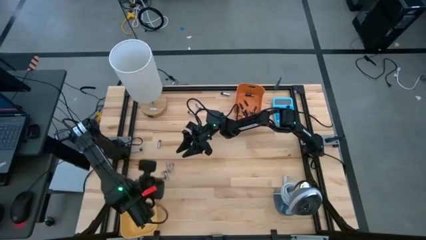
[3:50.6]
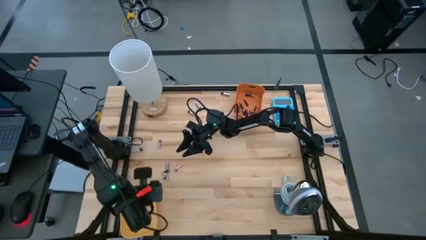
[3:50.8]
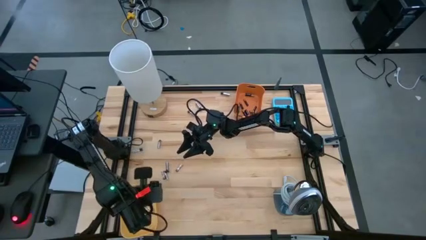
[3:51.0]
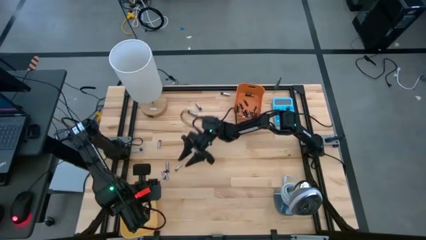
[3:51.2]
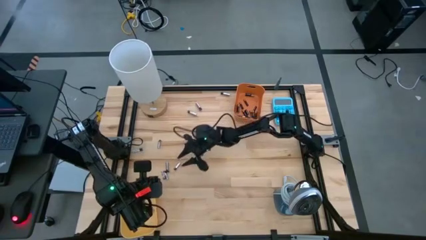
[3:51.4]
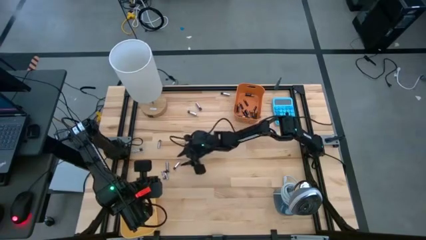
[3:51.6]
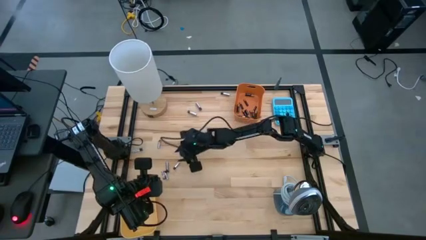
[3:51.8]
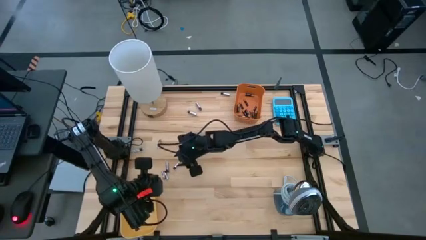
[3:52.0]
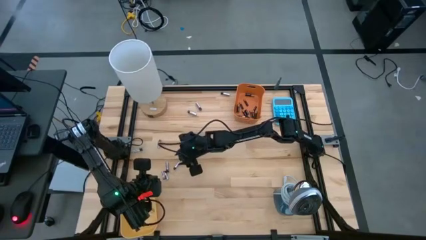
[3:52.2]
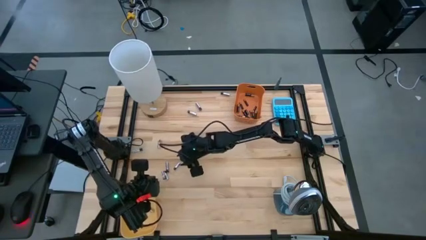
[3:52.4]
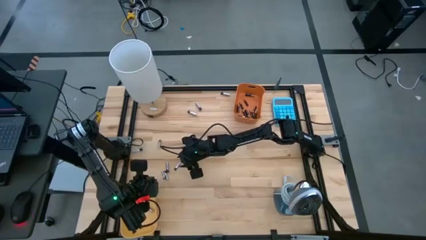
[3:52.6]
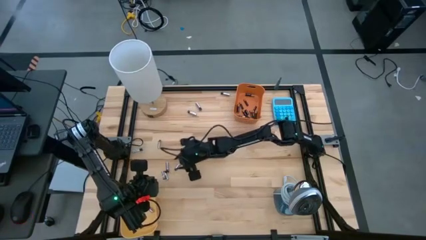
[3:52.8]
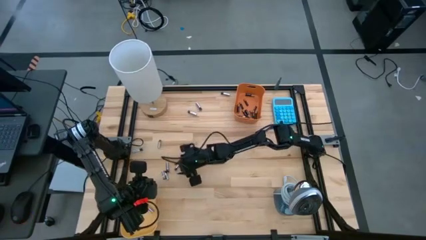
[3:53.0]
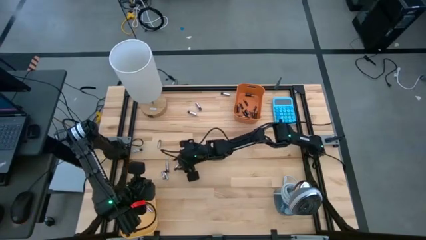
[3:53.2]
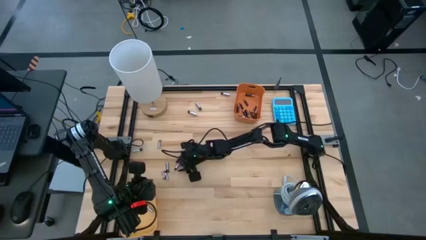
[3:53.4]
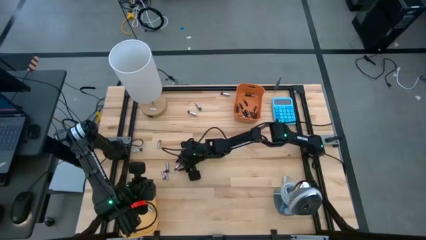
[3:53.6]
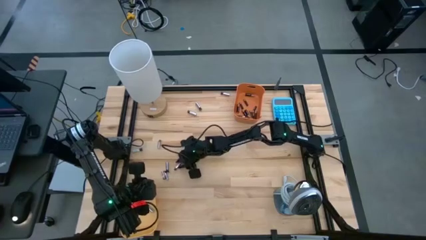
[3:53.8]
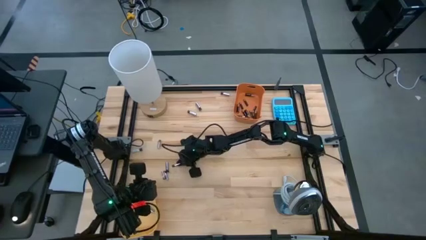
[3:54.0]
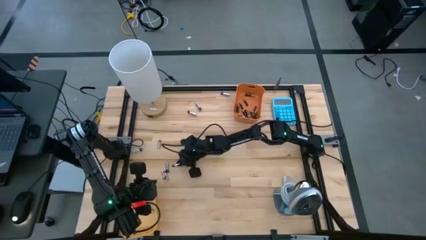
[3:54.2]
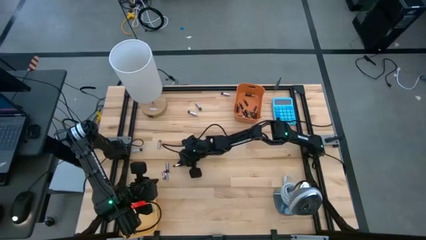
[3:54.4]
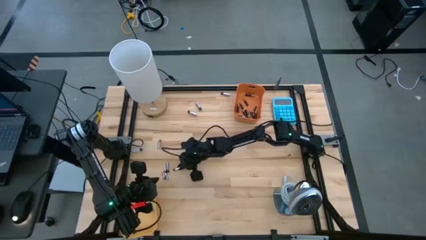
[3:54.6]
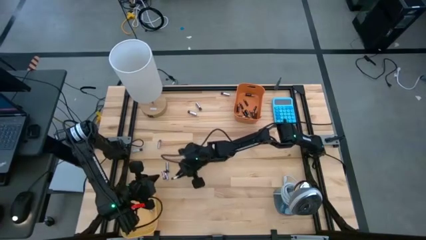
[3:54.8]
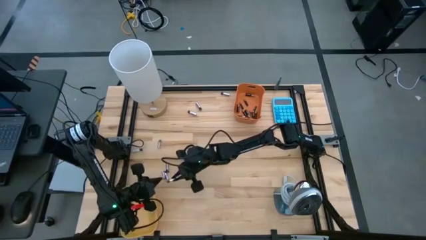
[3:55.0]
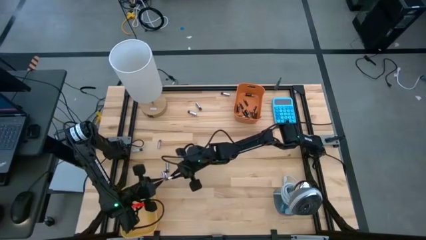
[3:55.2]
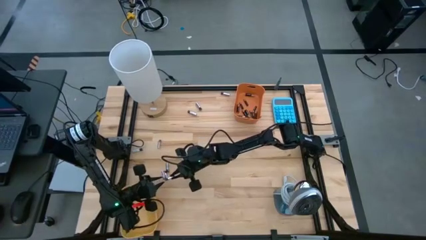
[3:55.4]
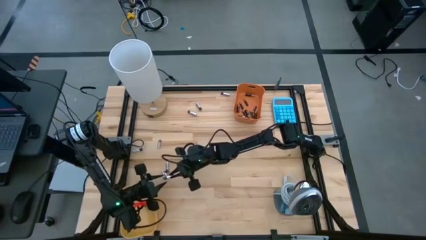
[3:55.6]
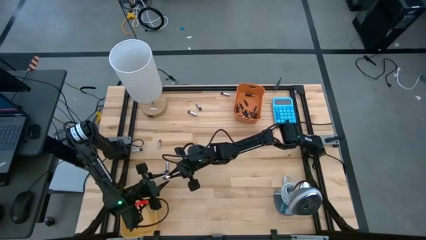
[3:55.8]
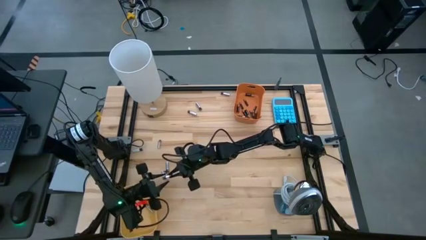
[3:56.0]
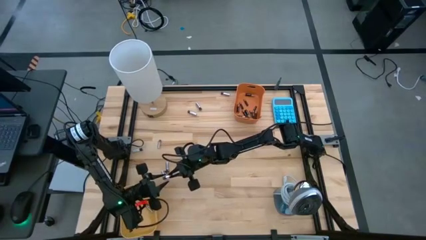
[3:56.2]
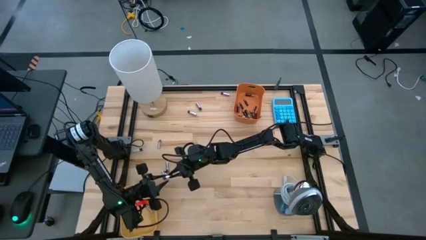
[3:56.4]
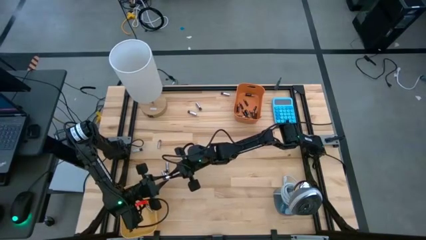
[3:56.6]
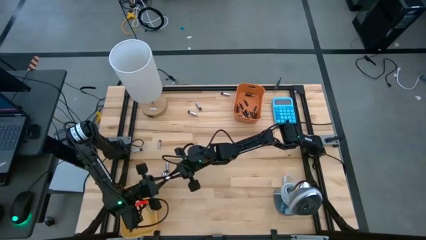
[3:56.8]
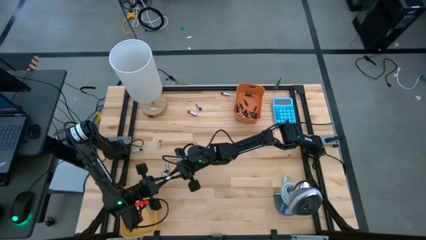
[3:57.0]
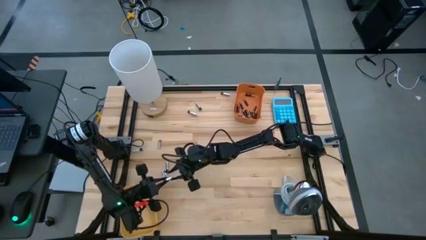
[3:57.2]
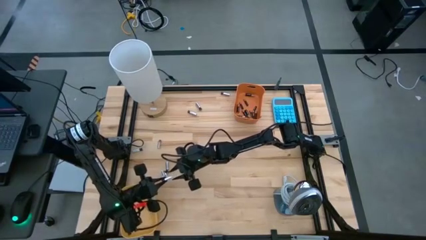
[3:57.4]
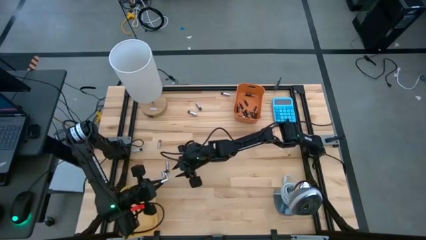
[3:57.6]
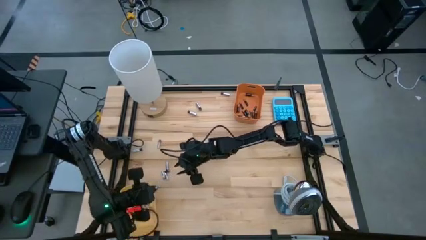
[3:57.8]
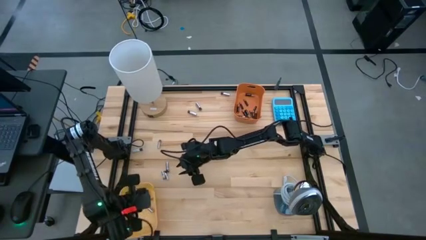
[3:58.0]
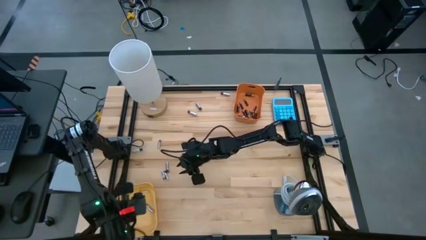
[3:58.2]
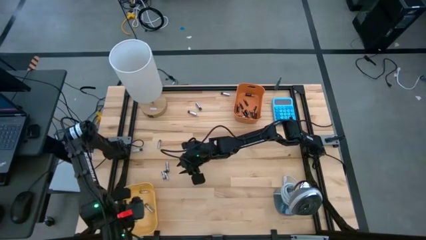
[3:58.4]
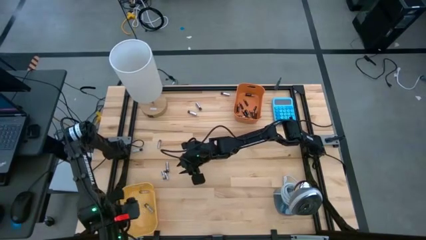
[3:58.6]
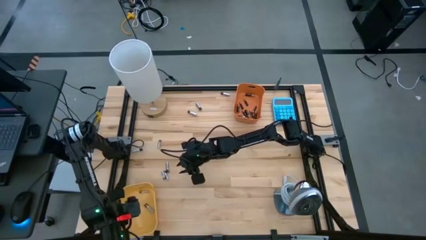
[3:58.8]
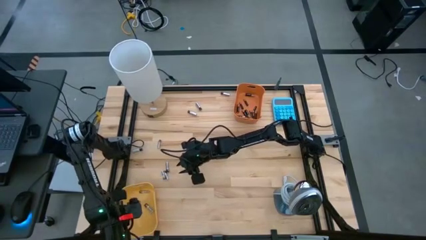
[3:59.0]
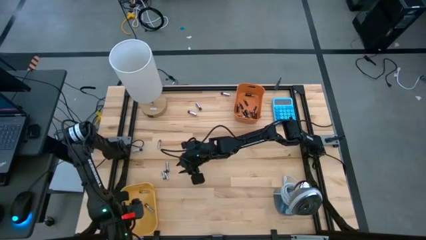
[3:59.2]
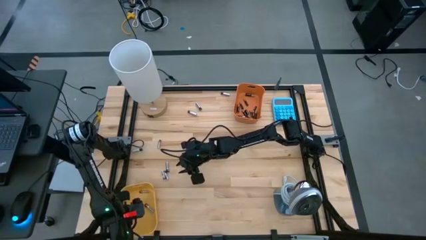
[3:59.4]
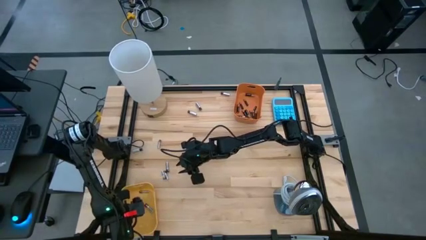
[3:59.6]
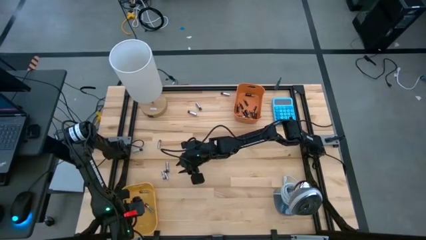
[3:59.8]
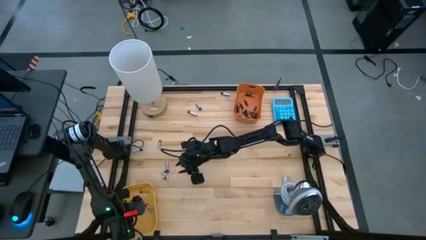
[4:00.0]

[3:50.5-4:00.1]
Task: Sort batteries
Put the silver battery into the yellow bin

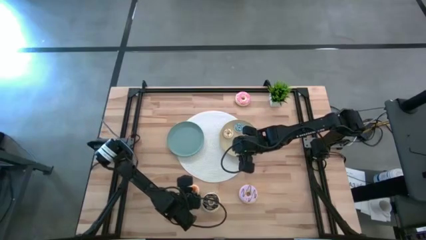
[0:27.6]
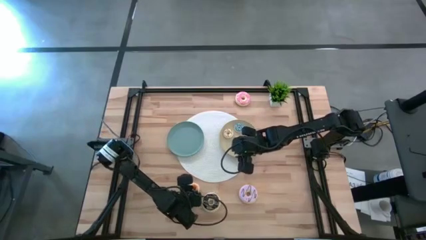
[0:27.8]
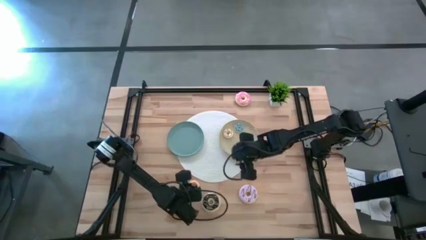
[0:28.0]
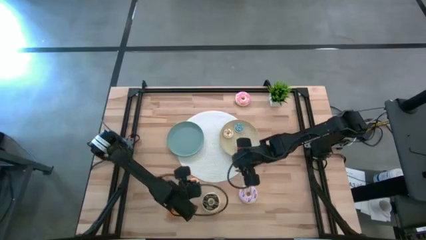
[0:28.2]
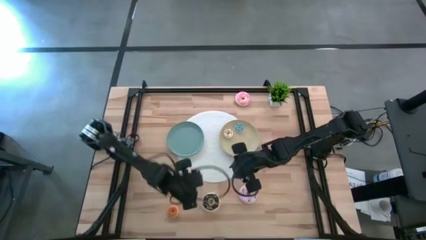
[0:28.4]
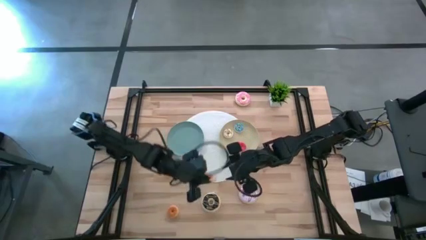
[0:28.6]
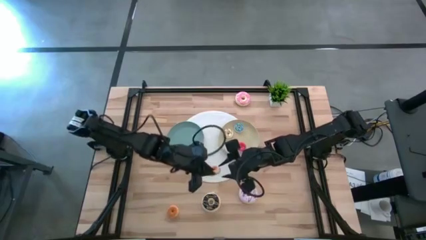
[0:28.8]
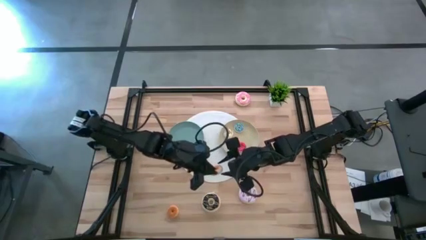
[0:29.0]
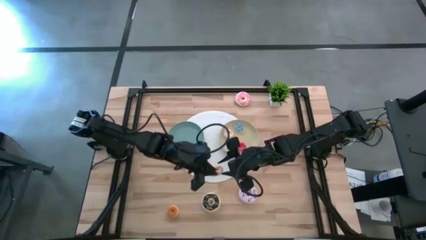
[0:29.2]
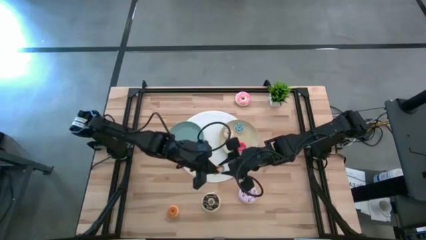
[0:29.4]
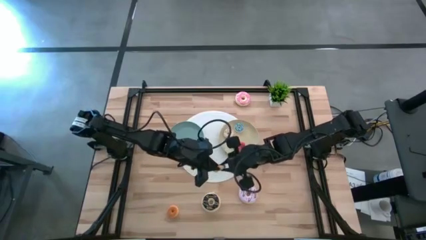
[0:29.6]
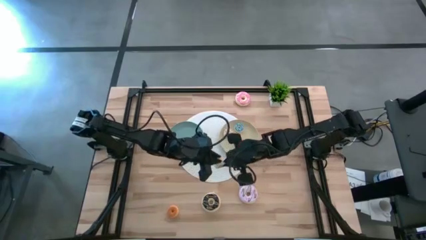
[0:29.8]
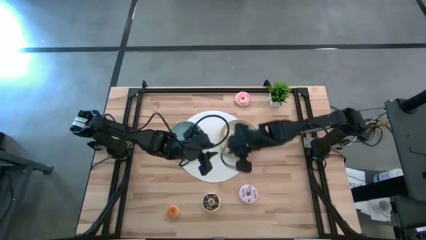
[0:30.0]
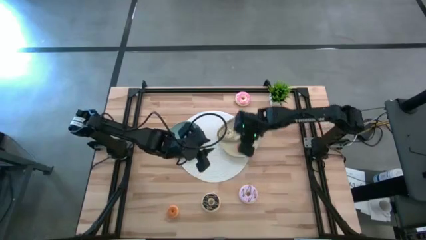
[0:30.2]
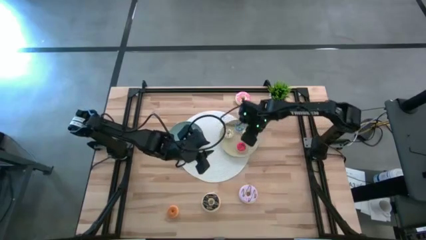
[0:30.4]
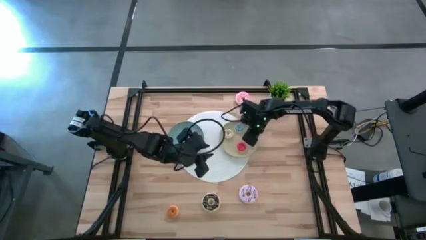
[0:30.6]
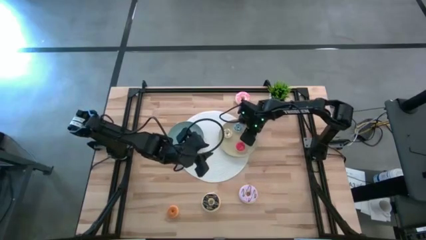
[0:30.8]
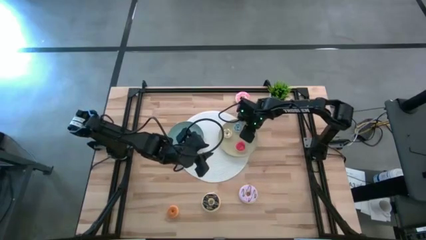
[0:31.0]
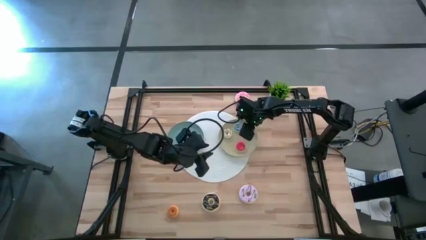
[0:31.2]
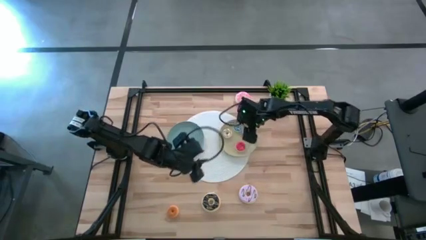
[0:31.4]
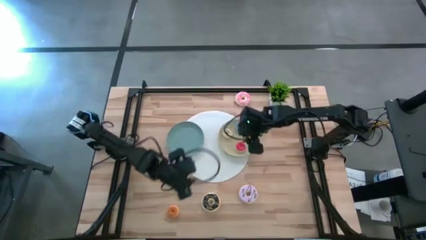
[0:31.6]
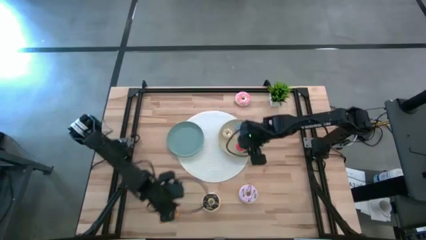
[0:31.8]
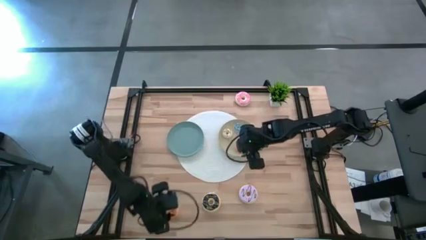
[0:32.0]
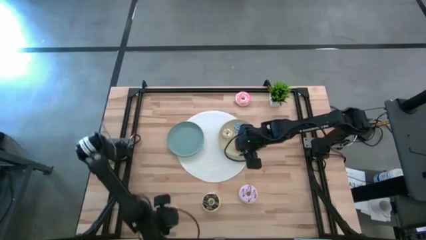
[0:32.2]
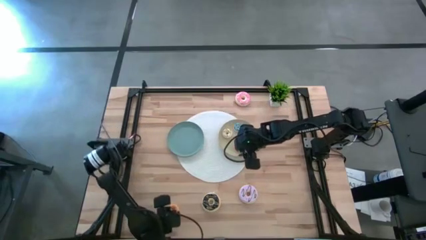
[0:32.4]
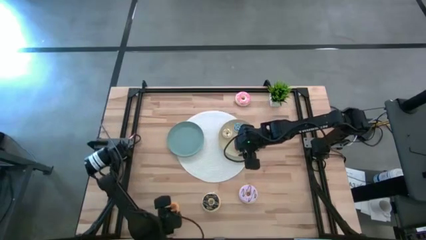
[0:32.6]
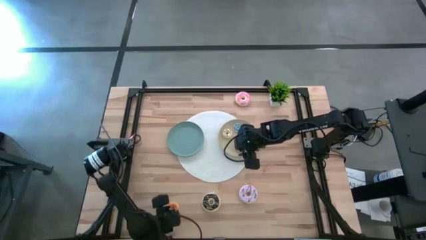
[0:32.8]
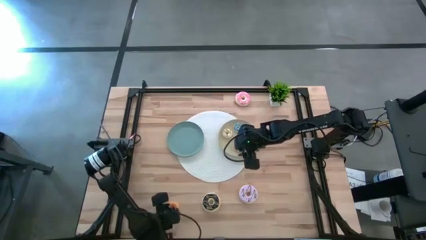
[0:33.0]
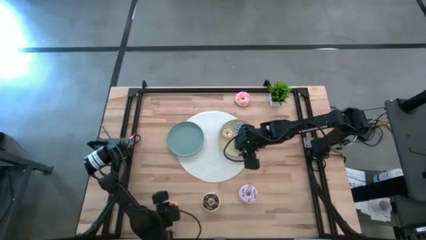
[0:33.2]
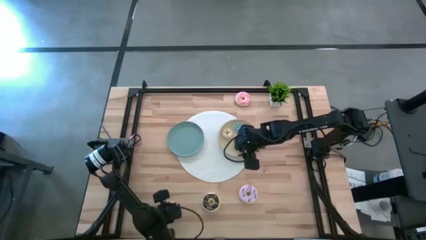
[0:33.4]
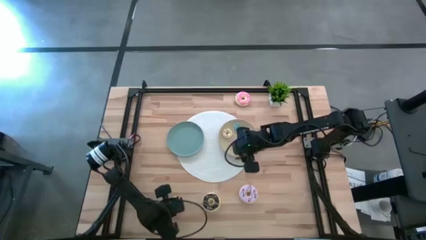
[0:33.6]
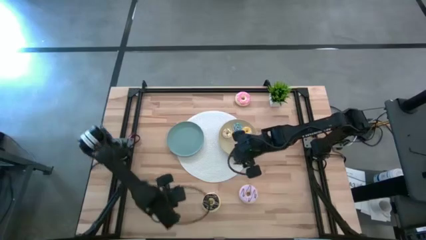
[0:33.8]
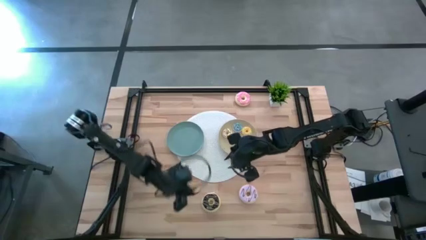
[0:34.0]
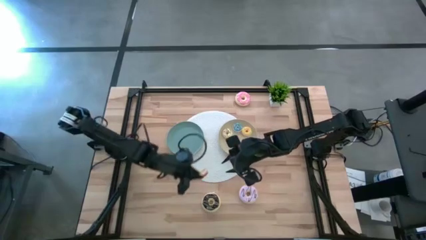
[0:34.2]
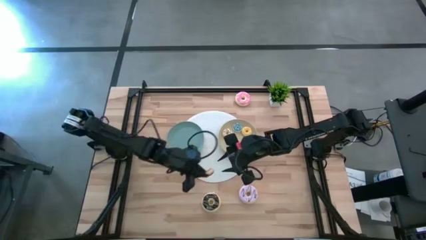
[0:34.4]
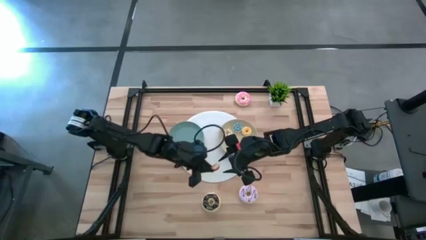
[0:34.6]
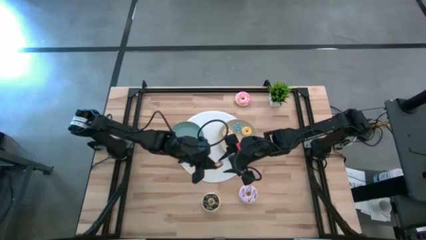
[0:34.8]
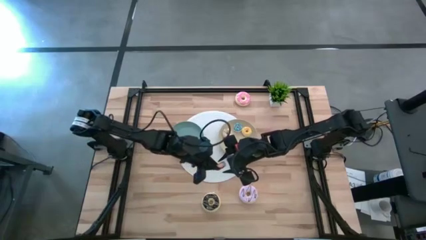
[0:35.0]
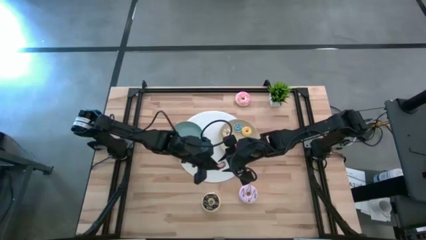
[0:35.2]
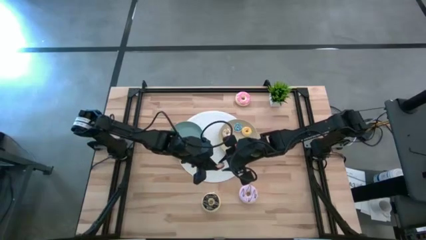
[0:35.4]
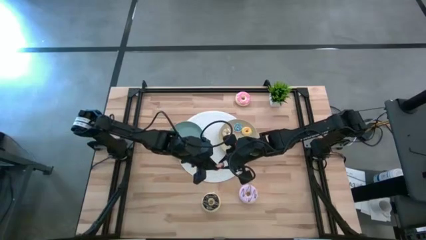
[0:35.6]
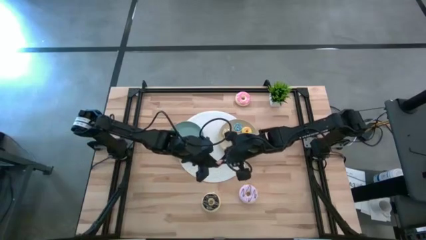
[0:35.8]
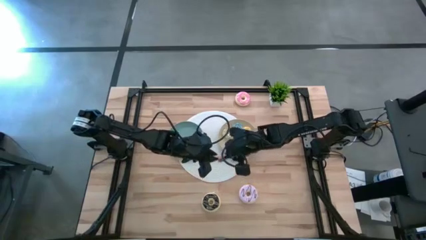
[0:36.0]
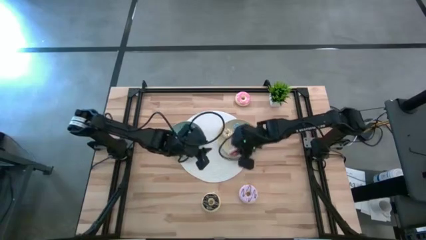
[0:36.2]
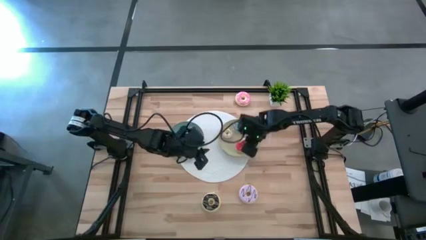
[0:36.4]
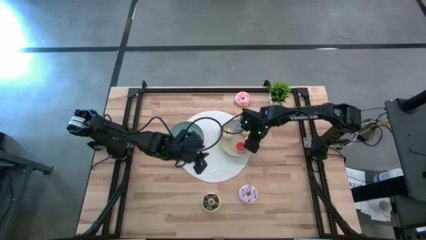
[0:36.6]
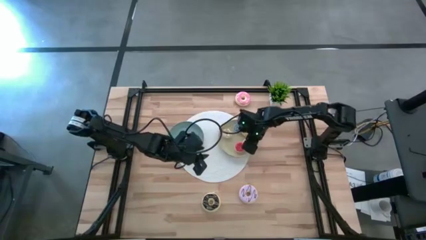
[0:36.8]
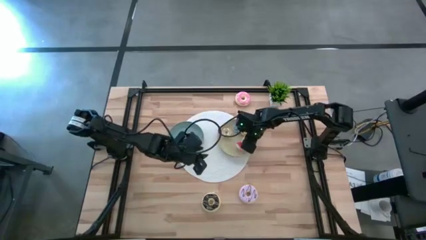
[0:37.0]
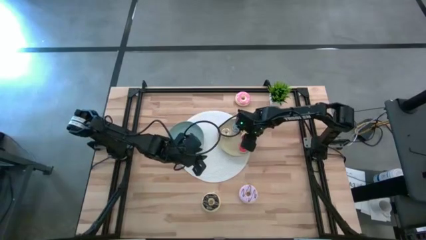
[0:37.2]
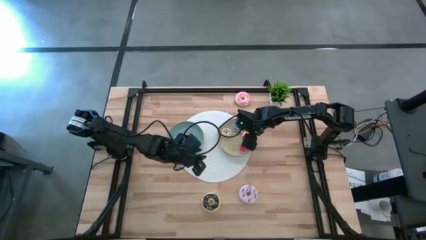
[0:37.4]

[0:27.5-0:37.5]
Task: Pick & Place donuts
Put the small orange donut on the brown plate
